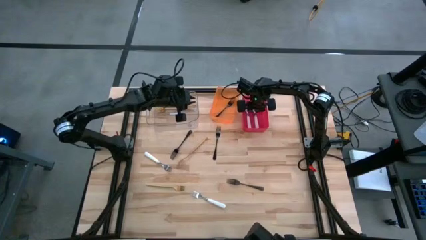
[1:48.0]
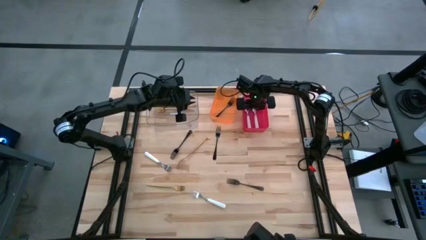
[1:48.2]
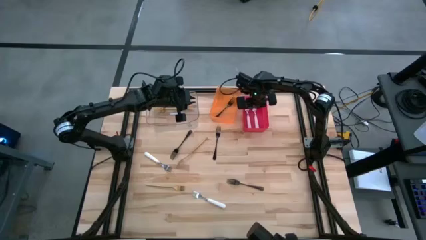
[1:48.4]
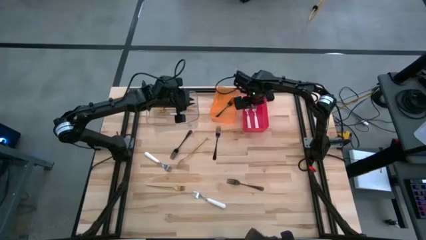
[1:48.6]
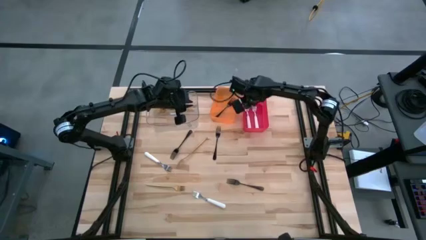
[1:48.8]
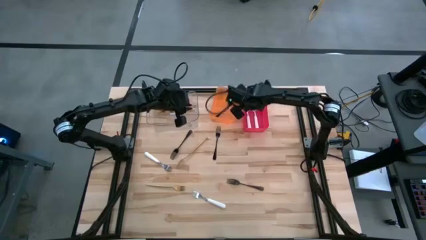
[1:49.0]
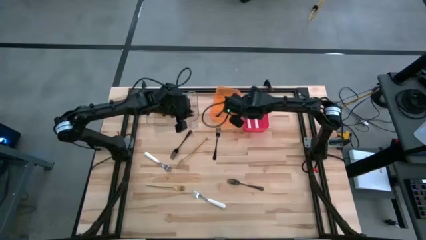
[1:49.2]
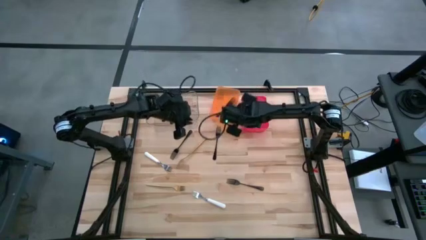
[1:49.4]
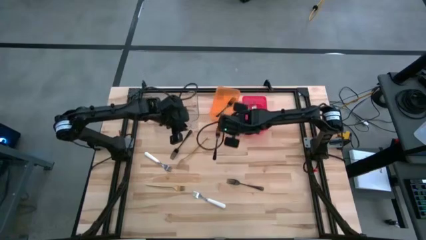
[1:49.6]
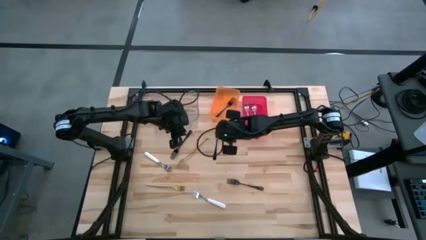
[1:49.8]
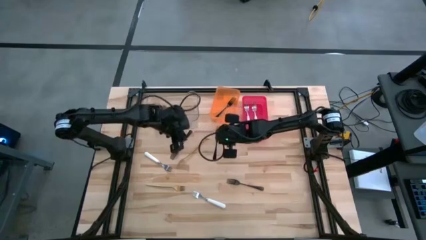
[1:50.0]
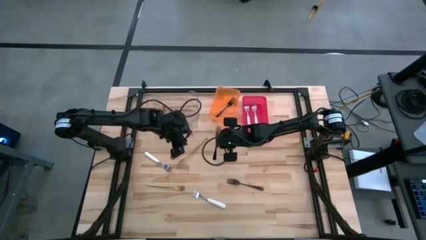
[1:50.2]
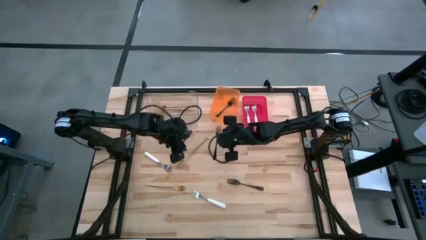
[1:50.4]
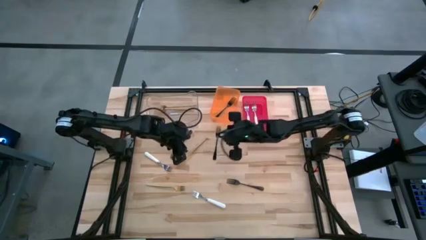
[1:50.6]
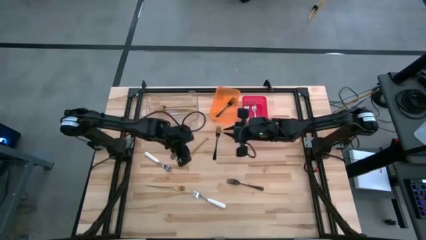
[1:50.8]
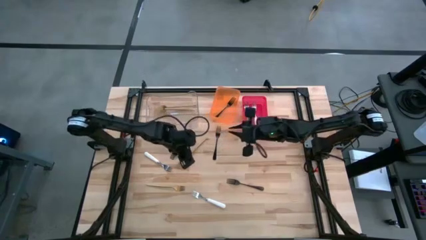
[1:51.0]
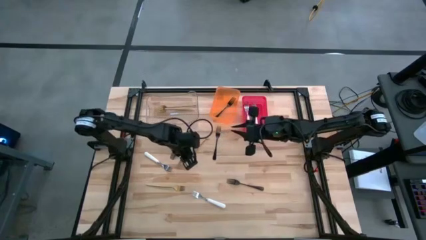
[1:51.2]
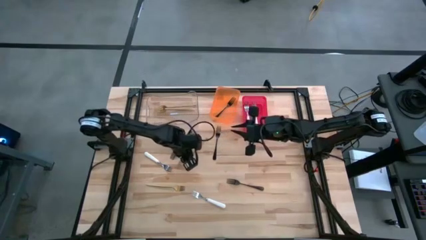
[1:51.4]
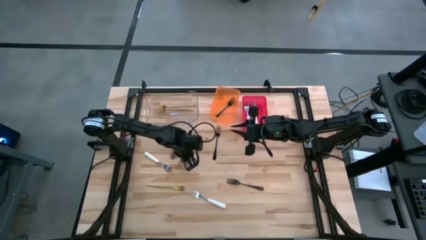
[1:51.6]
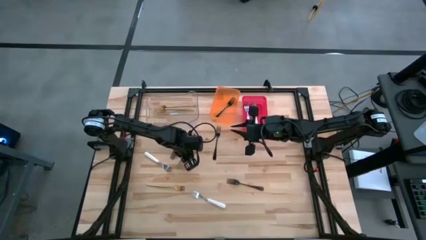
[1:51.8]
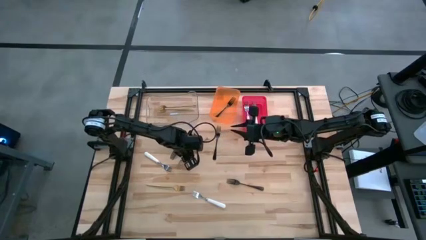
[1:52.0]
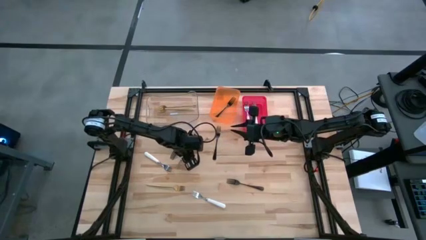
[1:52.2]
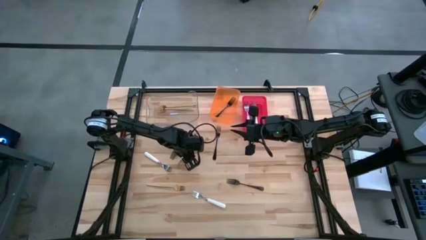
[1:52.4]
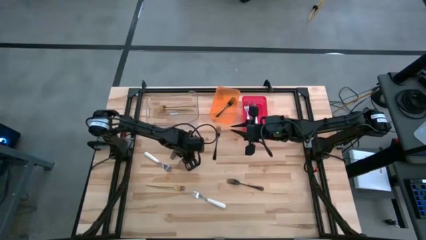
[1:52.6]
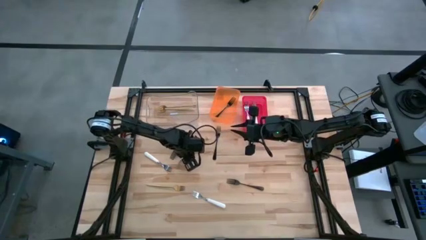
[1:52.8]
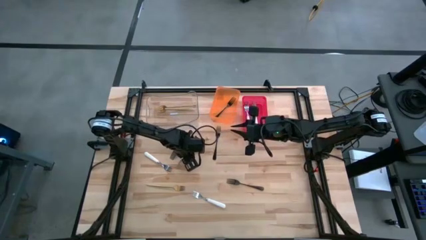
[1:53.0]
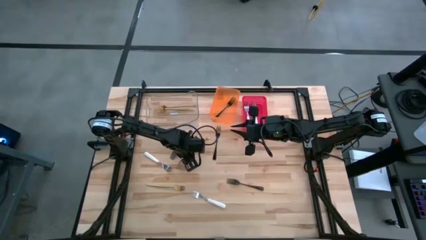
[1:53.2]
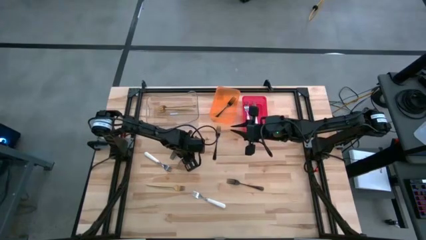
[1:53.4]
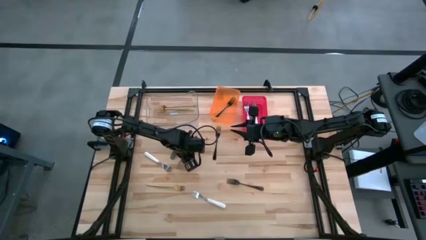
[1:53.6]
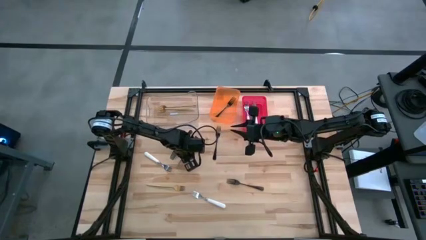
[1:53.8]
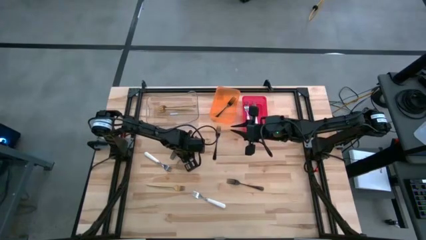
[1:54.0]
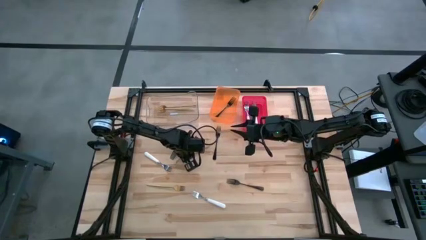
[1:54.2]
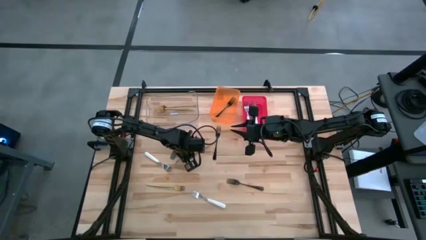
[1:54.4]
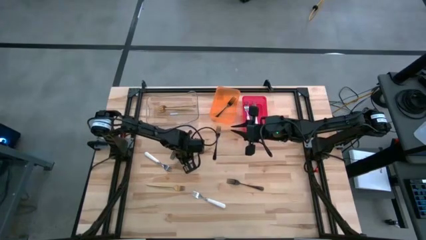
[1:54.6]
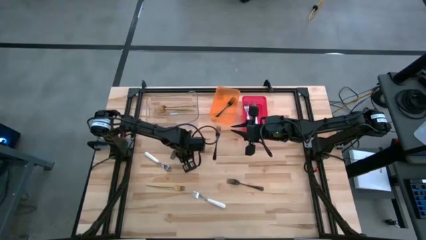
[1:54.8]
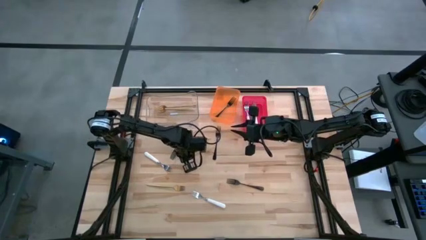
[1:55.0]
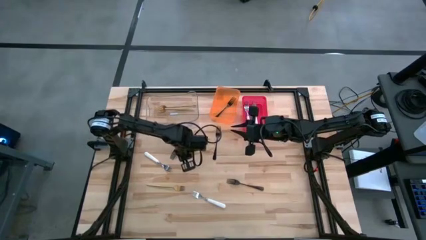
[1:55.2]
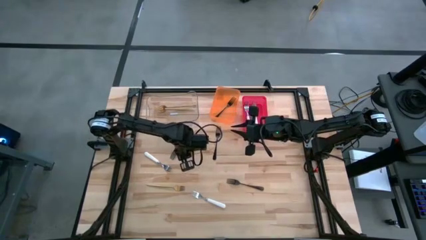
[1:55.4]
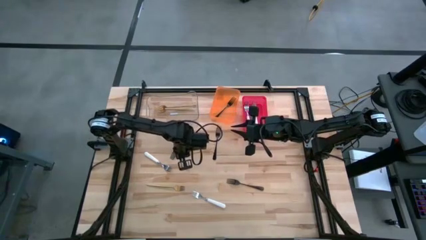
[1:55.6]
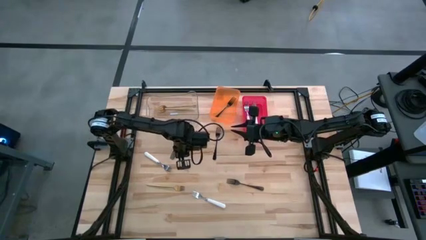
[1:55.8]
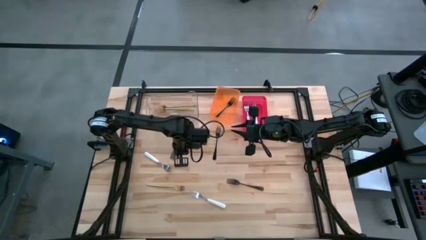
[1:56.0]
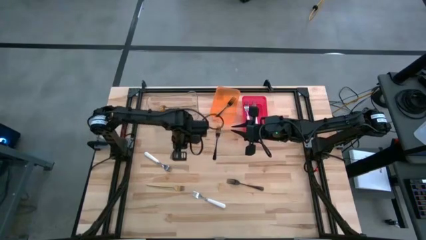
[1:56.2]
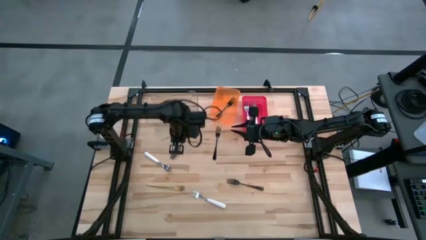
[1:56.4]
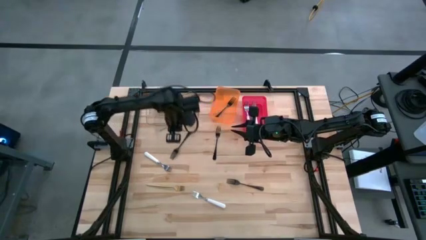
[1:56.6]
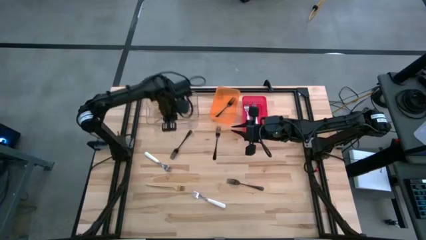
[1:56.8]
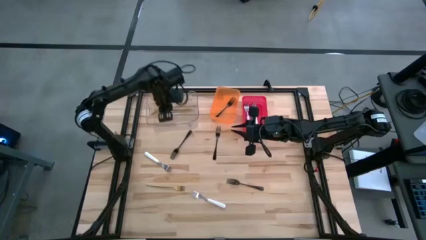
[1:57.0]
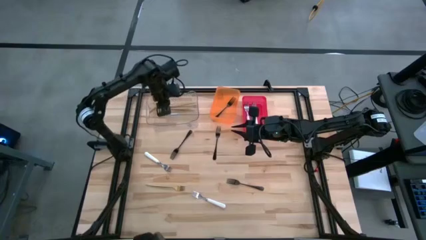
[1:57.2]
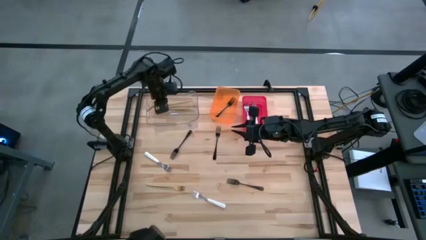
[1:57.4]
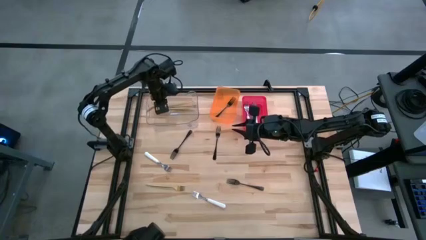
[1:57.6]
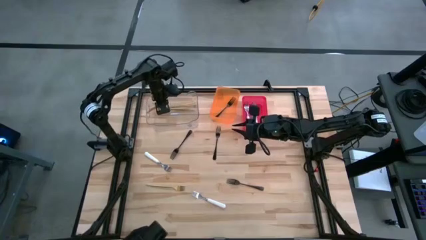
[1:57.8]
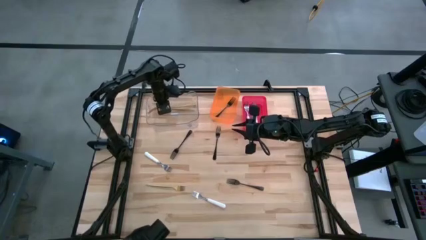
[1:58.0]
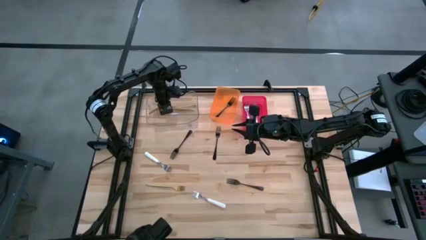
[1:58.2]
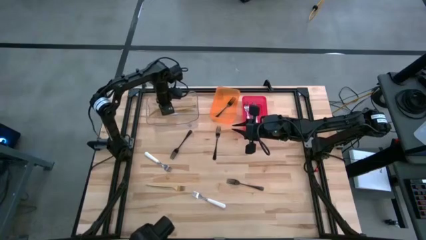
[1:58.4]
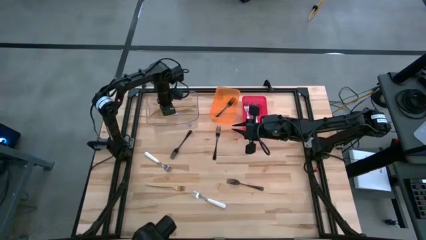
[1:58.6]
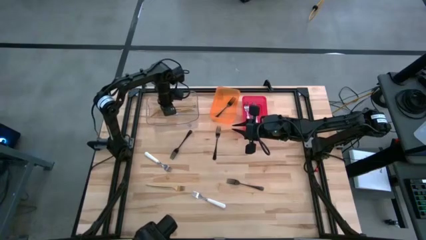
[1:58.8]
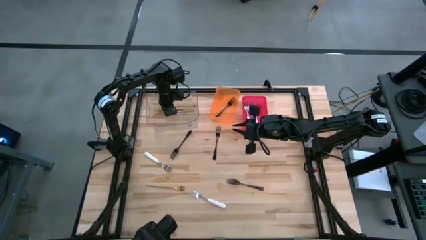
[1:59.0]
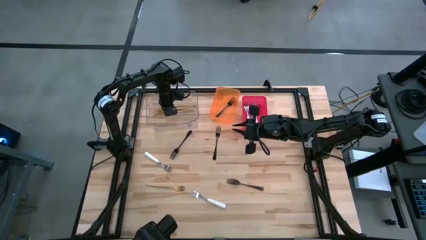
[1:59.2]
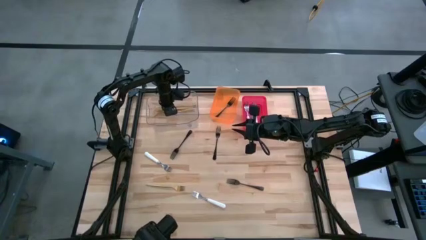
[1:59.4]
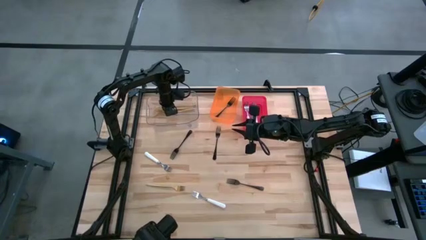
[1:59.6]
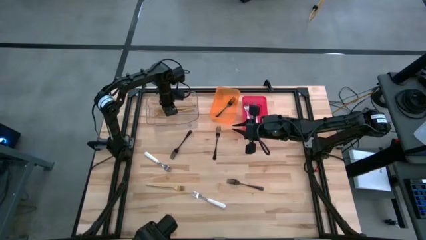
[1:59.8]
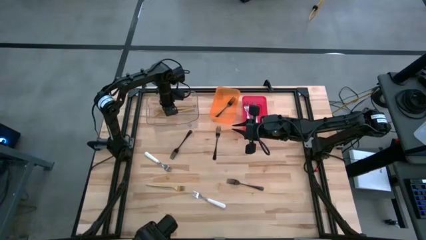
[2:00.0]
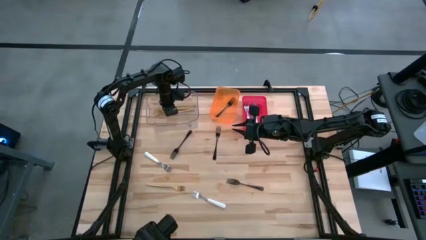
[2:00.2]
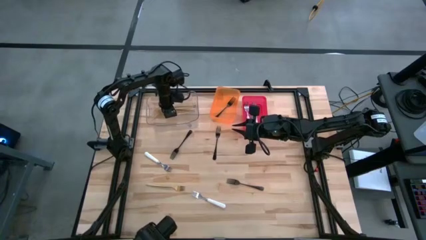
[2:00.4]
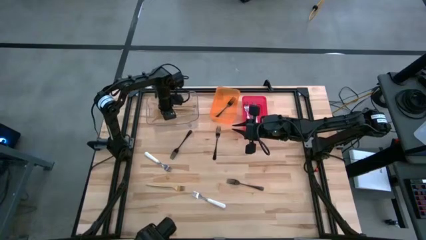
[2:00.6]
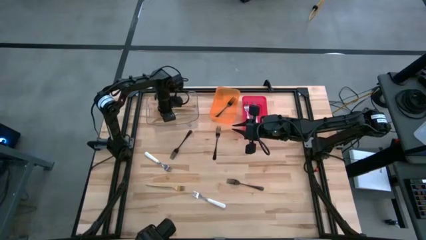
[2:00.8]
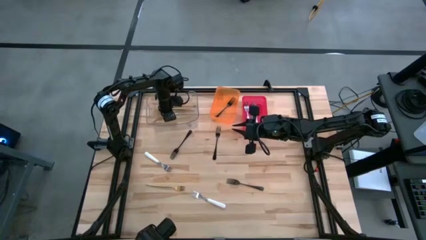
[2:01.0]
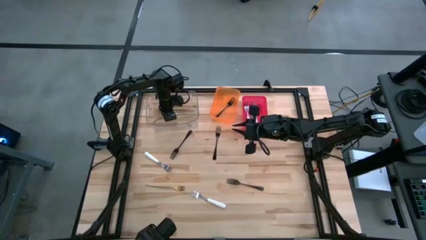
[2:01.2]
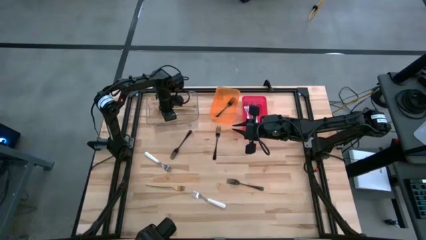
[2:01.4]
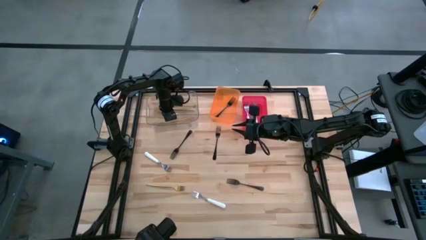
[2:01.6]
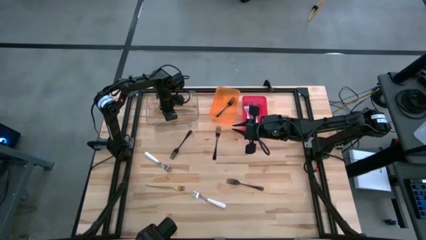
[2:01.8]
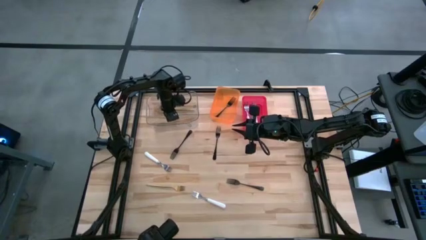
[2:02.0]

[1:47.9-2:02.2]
Task: Sort silverware by color (type)
Put the gold fork into the transparent bin
